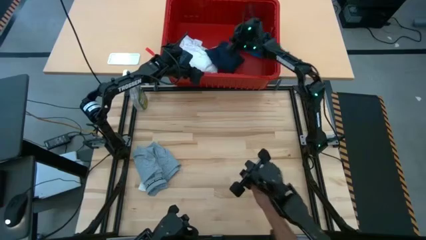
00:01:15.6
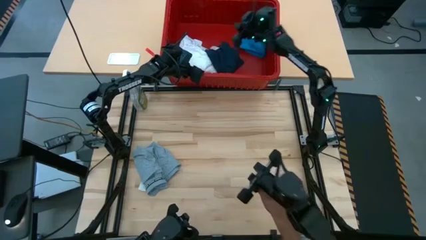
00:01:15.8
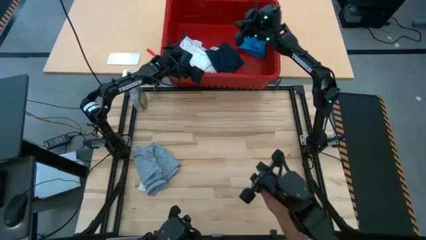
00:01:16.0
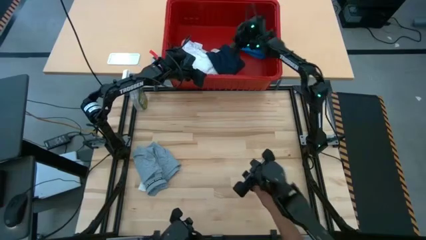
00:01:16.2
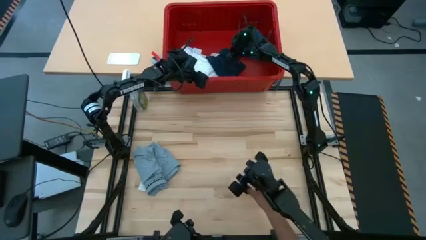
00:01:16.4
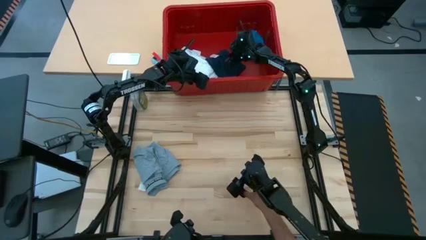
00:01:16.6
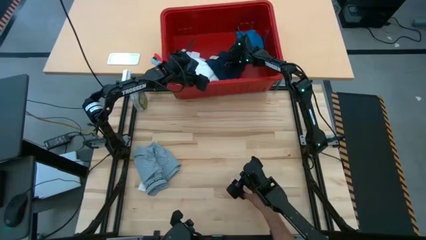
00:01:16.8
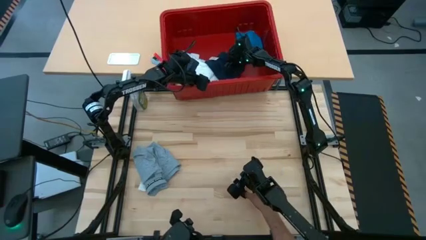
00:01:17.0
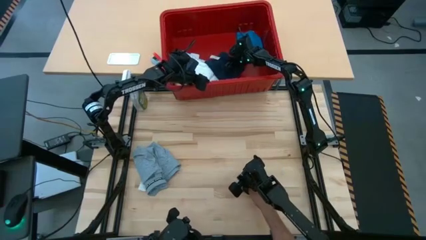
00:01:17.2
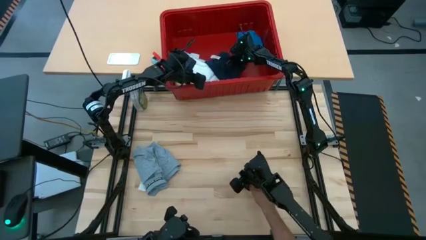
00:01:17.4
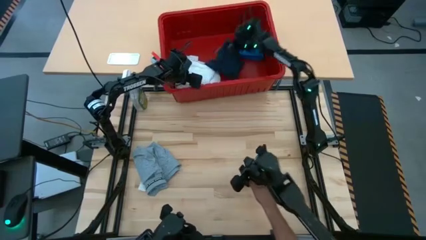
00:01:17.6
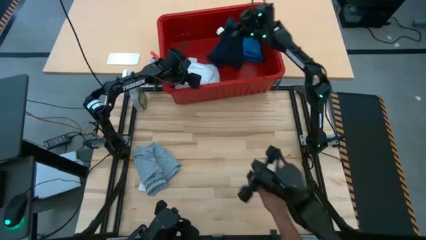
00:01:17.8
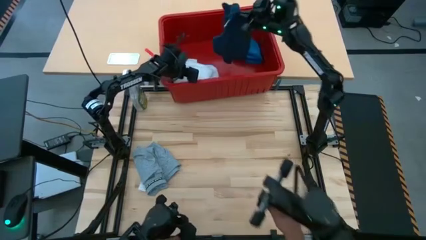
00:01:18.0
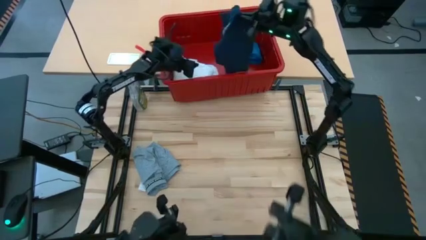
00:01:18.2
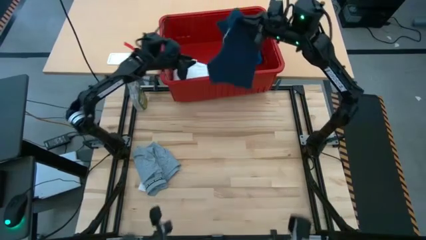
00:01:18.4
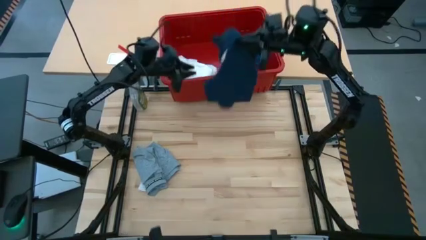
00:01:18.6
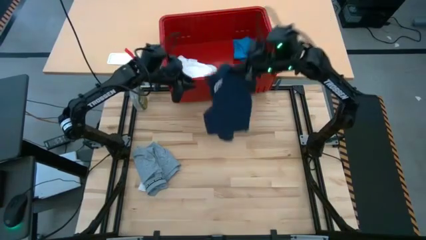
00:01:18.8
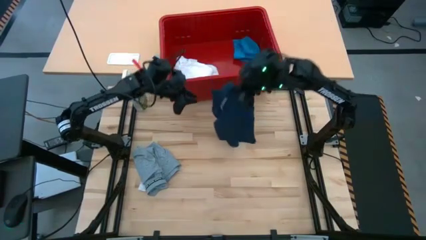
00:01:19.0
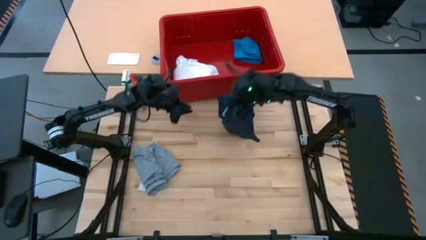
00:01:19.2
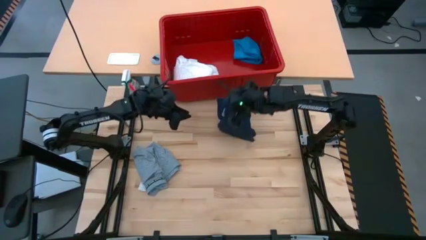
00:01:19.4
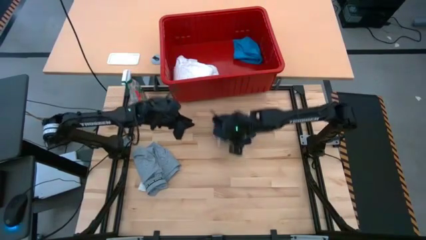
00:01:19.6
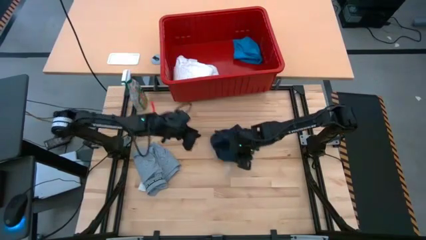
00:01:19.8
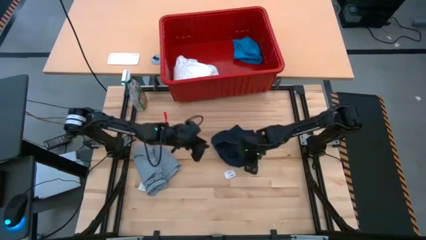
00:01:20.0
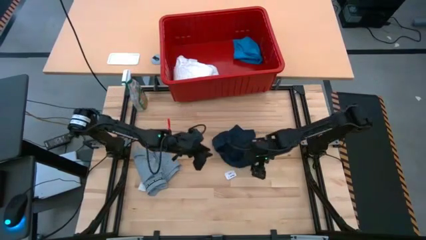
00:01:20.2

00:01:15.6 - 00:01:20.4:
Task: Fold laundry
Remove the black pants from the red laundry bin

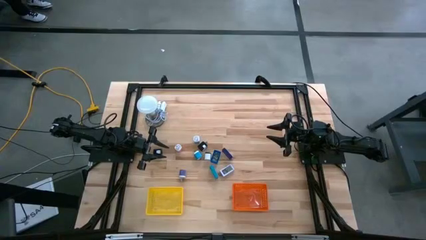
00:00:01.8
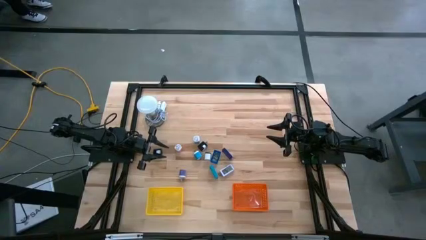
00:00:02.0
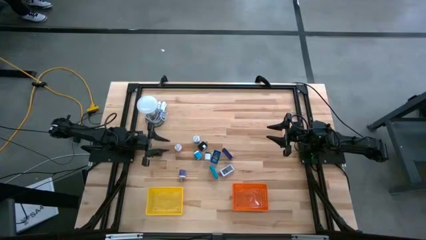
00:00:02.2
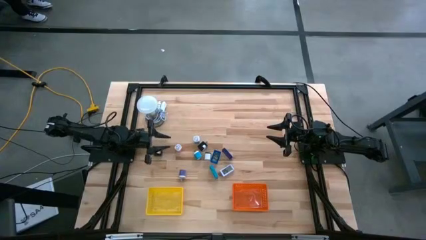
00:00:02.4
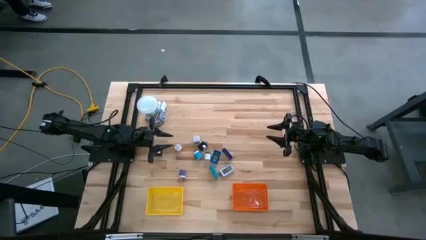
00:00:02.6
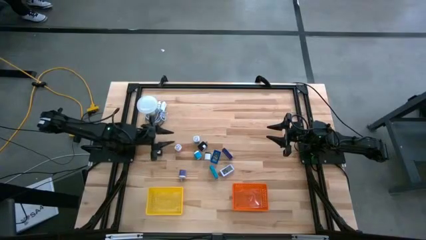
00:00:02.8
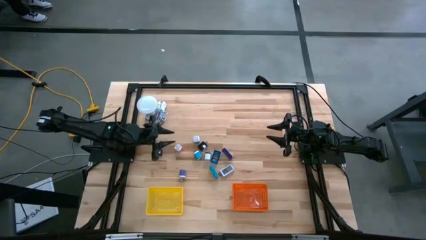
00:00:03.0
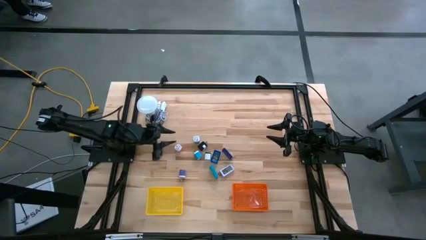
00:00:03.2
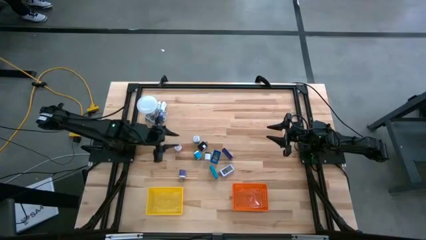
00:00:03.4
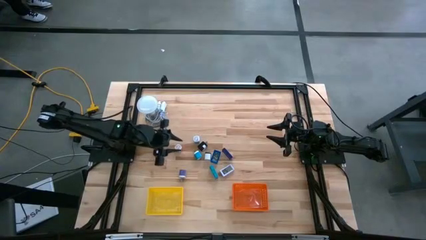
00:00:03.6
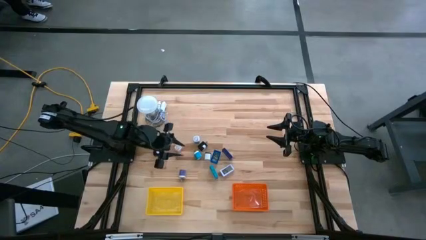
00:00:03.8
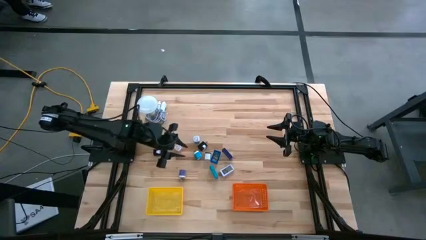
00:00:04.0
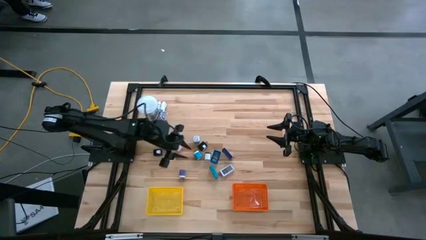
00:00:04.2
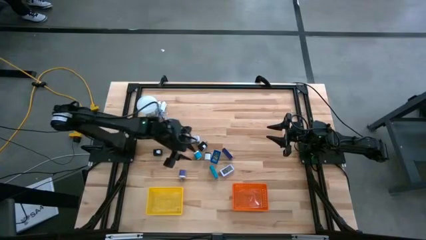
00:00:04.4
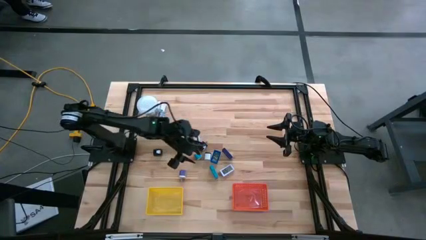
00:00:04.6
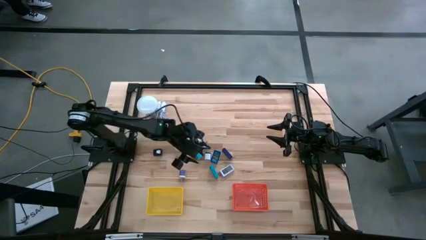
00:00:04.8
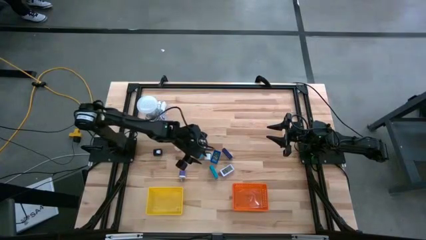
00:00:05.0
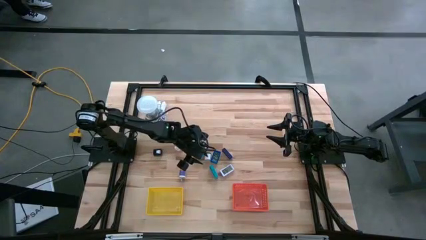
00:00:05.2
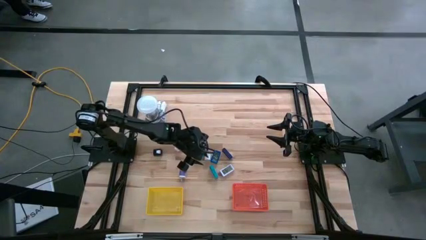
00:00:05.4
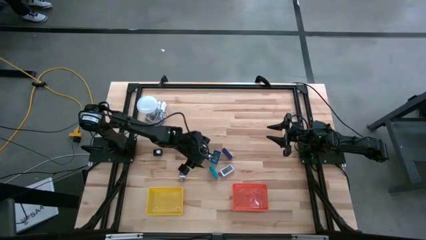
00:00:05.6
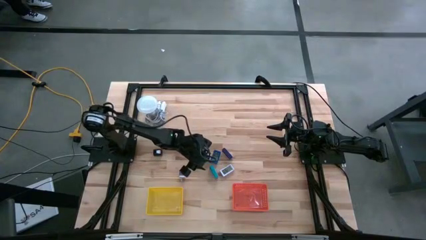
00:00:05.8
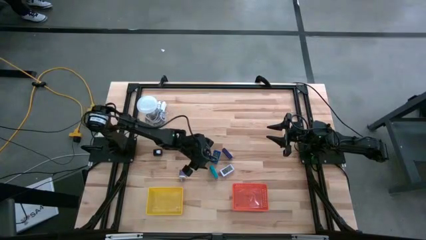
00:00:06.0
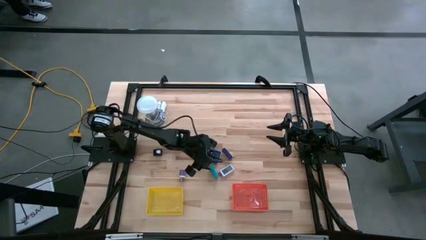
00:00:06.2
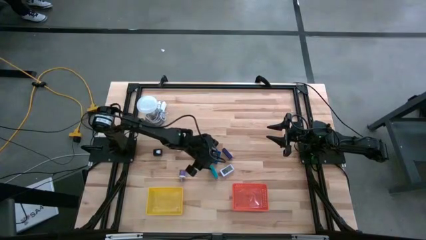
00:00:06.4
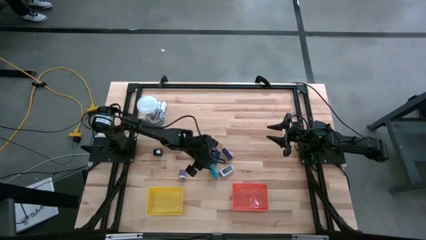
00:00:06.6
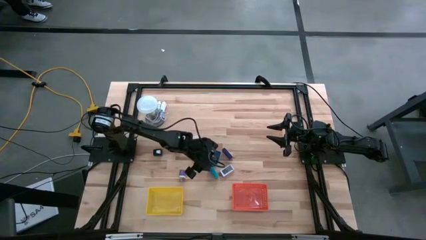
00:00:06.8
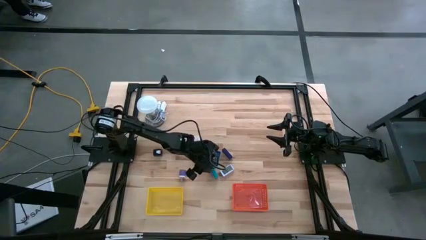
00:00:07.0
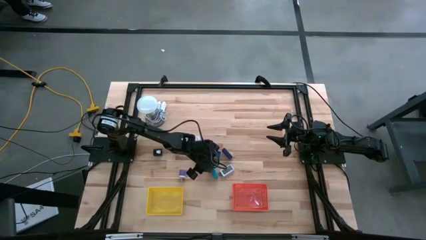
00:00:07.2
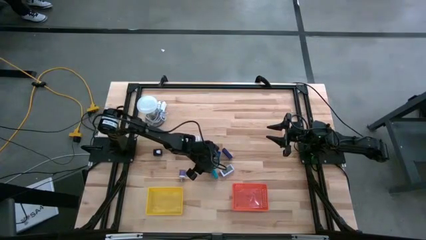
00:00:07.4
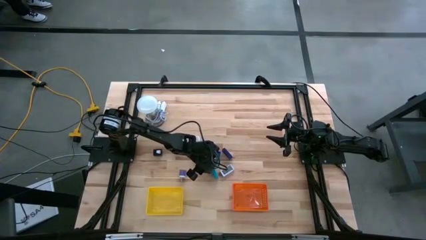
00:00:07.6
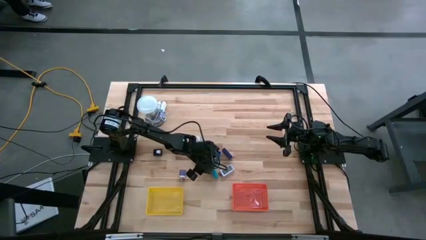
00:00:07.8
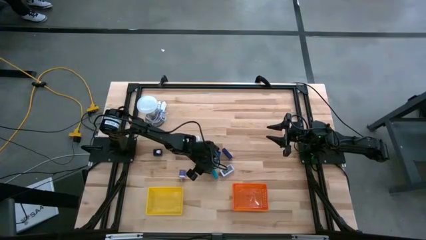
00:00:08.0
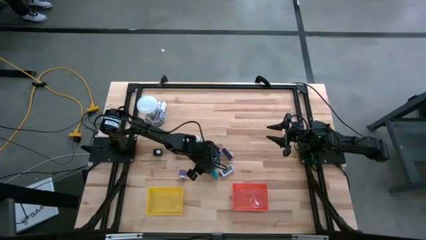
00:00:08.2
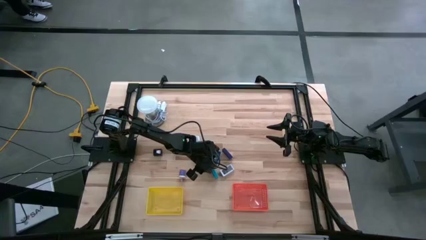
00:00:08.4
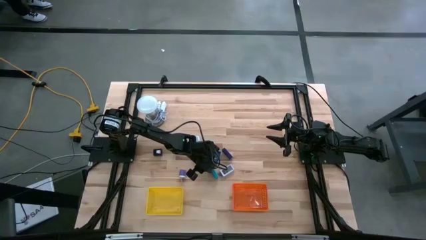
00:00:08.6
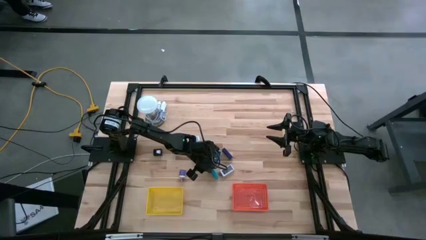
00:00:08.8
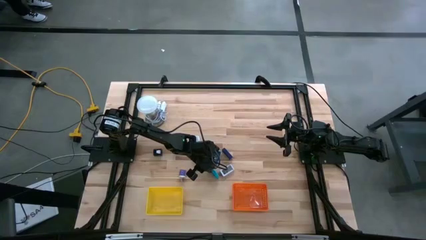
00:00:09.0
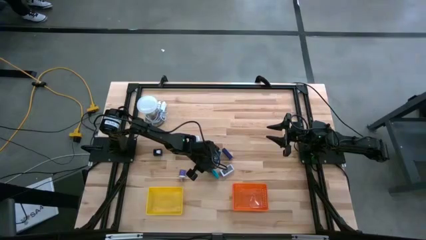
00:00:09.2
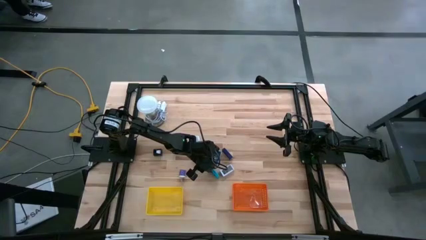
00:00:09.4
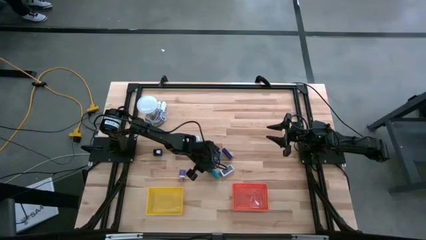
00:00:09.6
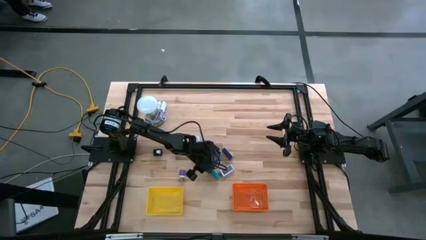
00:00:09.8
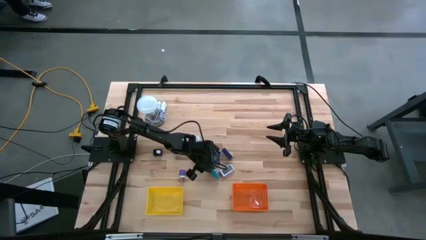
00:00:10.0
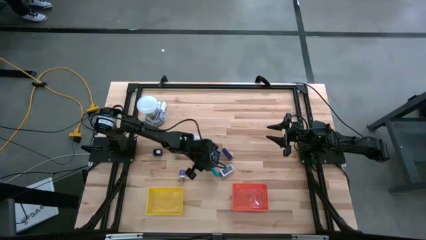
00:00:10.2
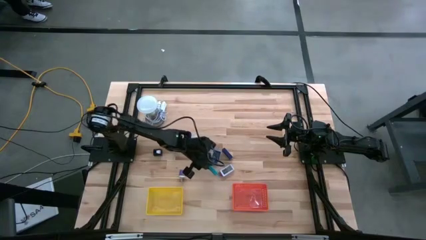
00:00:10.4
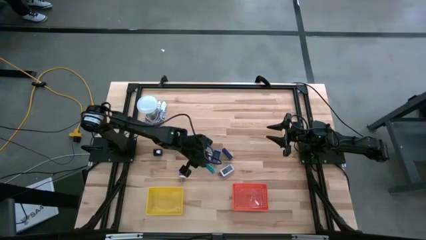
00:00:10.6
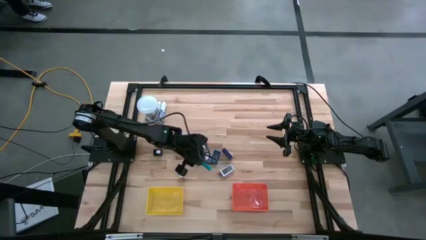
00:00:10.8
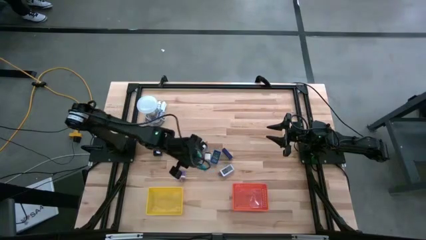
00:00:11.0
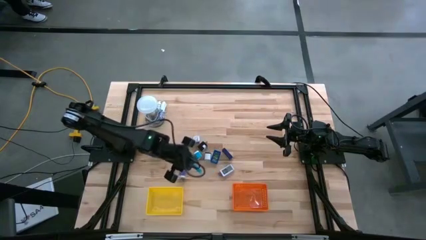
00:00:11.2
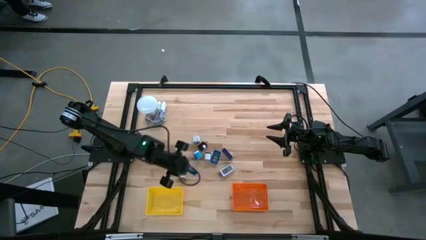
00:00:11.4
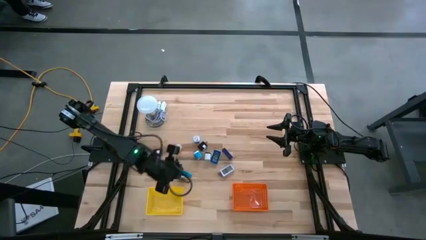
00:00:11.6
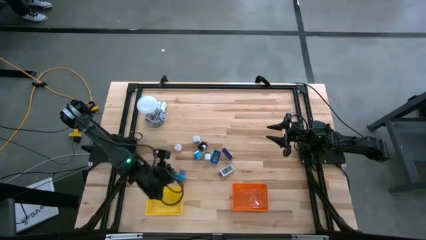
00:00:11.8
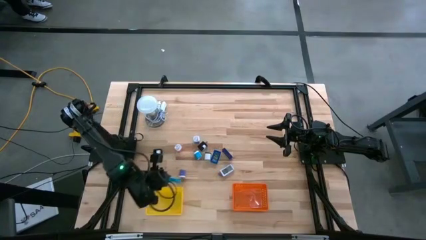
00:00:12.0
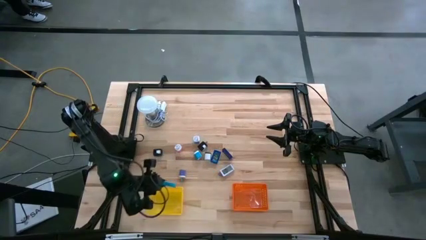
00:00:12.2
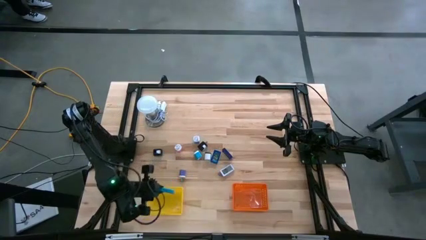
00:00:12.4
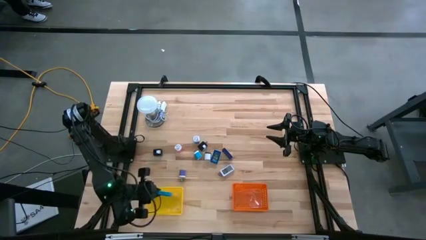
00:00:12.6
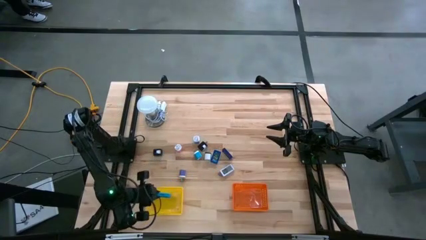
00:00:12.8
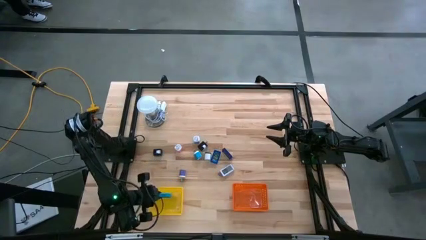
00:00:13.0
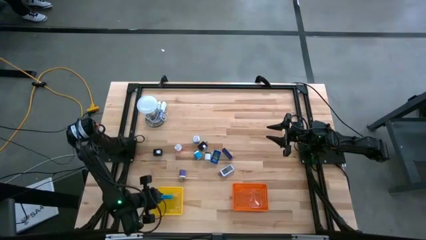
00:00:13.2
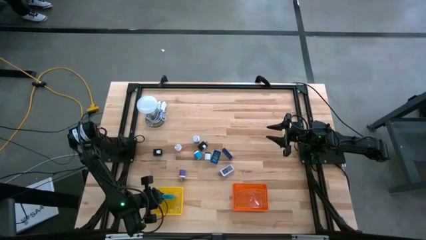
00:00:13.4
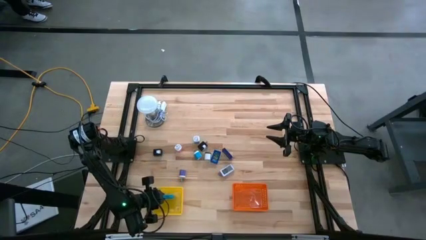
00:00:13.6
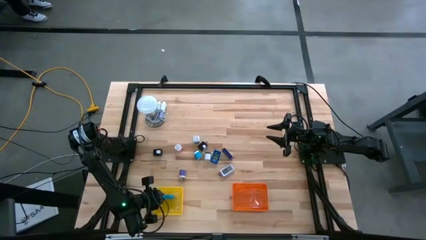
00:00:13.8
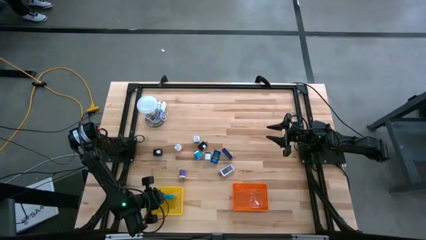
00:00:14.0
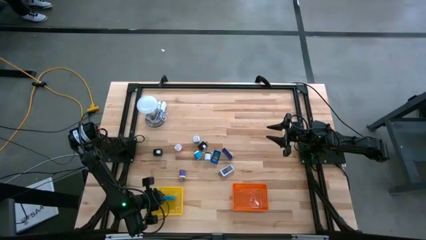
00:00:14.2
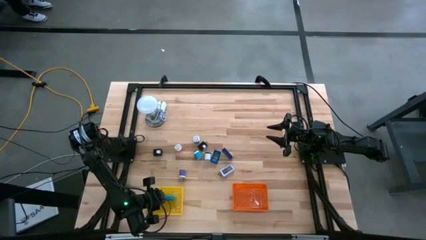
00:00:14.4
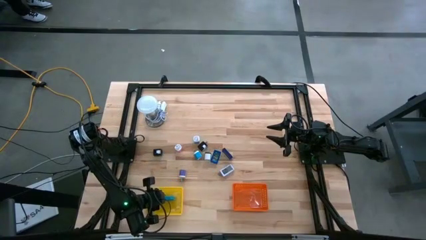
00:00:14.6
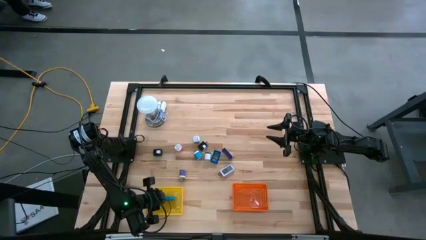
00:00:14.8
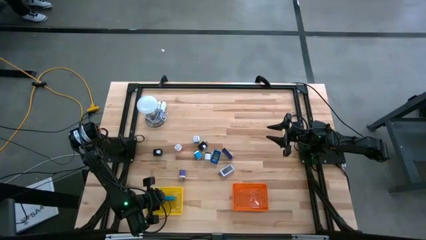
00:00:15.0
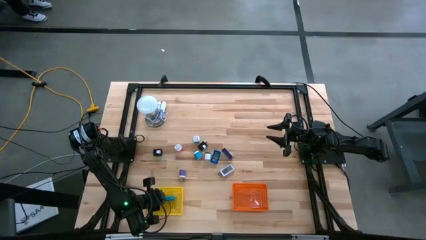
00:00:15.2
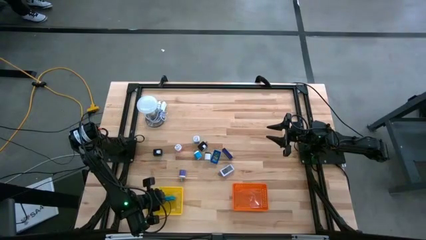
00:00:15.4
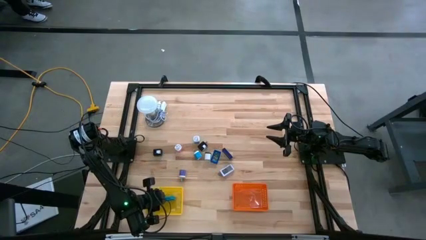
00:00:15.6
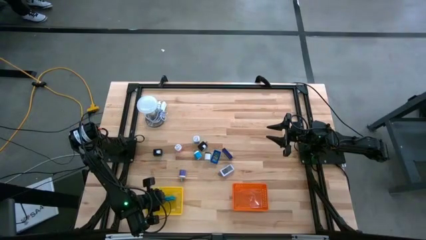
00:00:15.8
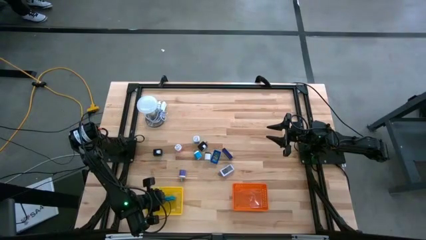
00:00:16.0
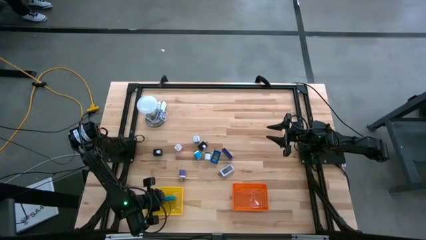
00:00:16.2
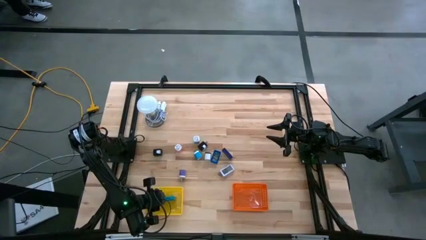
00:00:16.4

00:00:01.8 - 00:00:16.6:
Task: Pick & Place Office items
Put the light blue digital clock into the yellow bin
